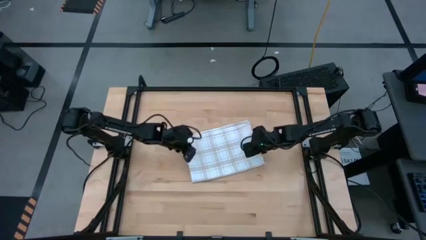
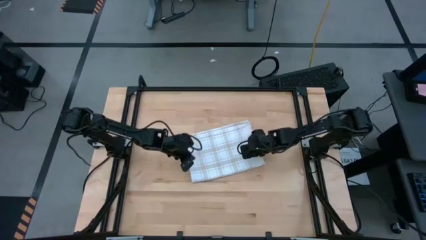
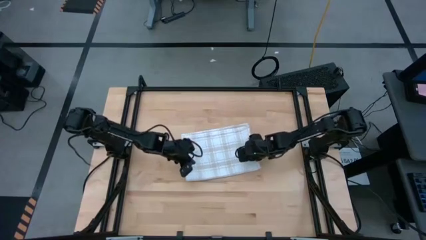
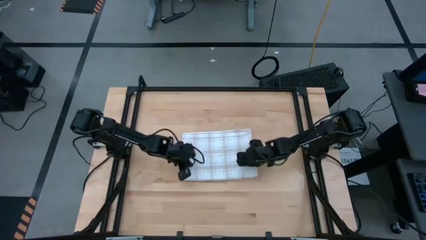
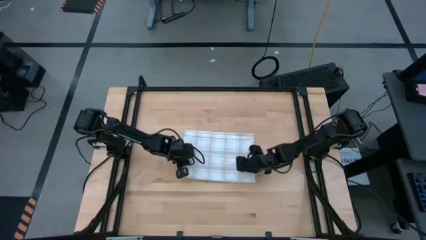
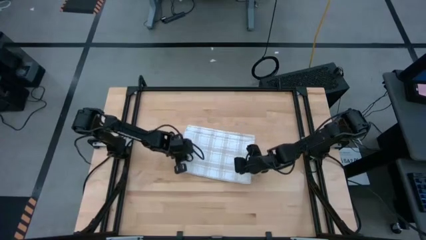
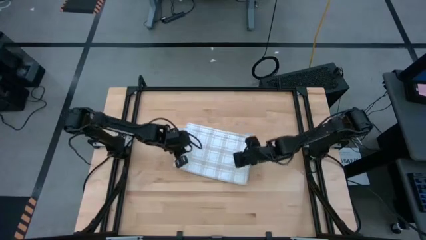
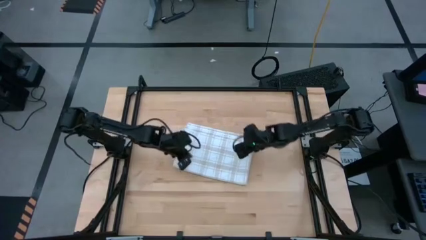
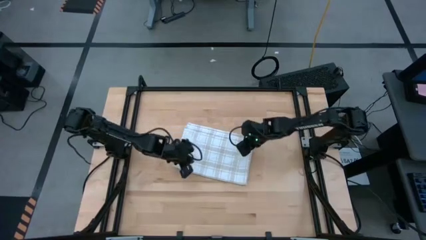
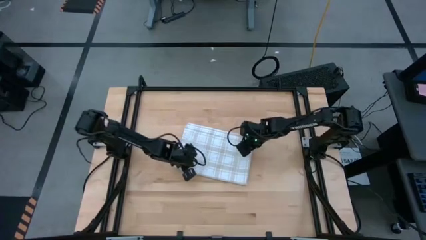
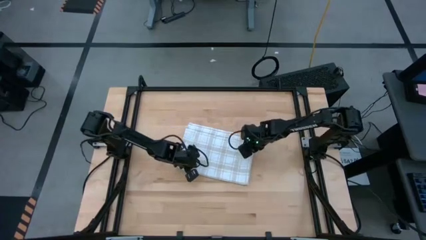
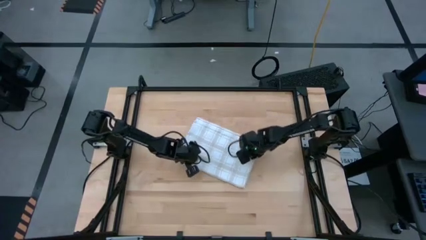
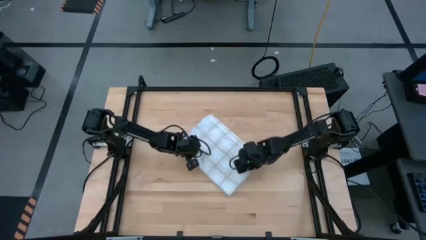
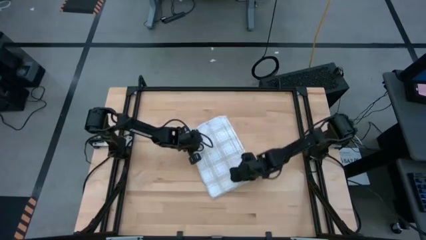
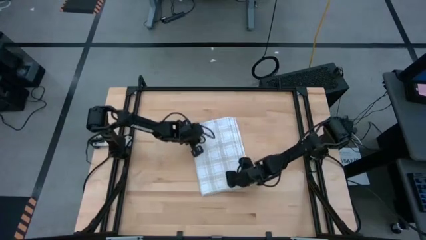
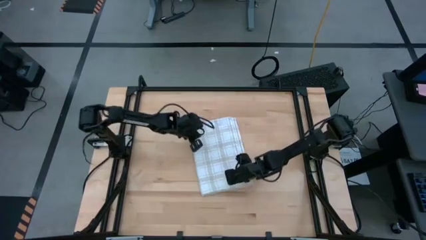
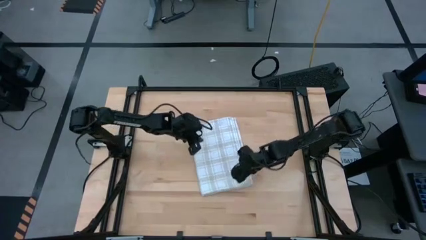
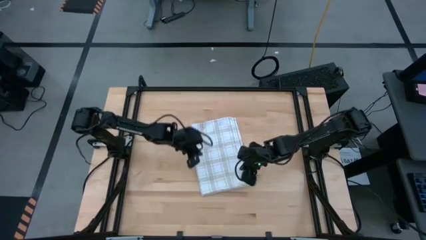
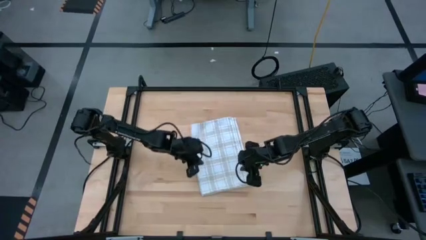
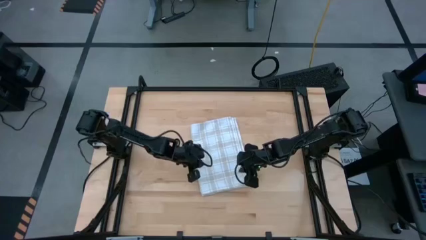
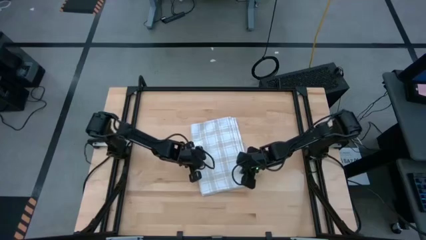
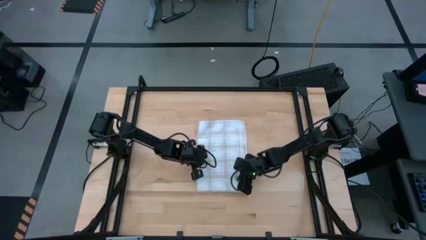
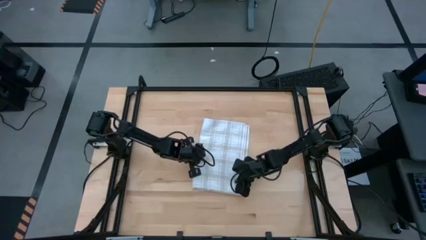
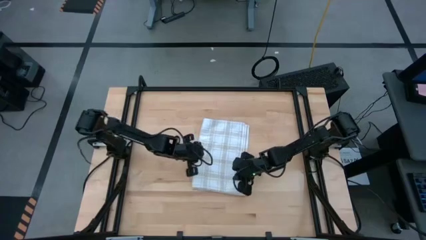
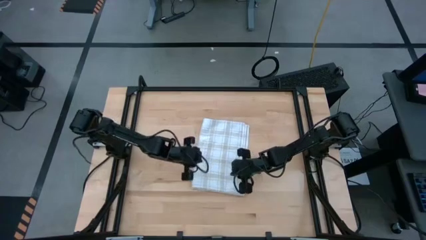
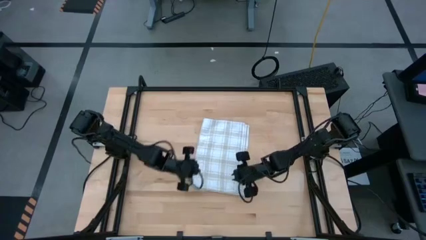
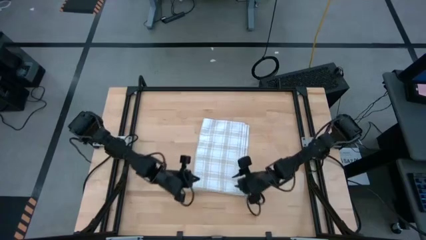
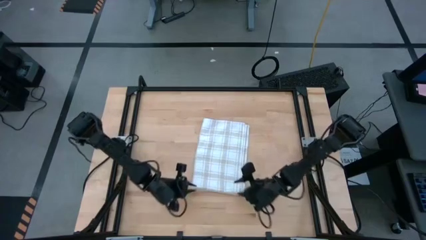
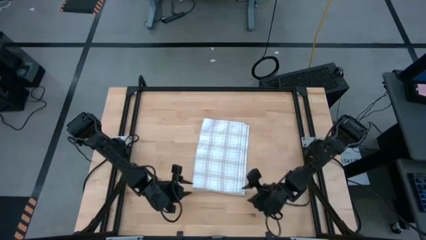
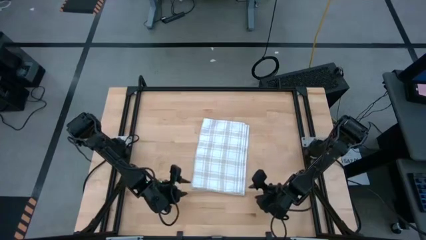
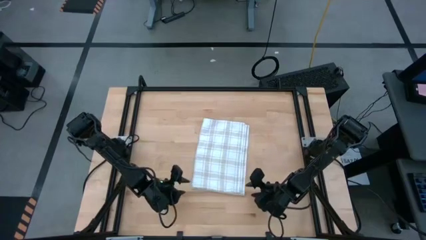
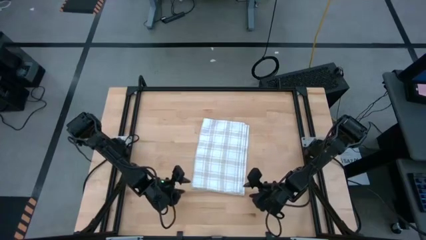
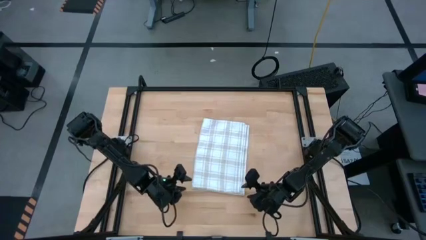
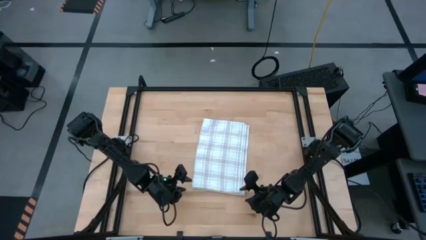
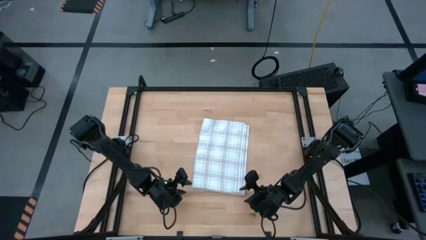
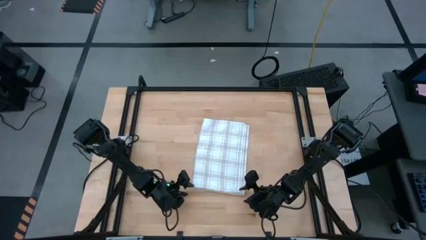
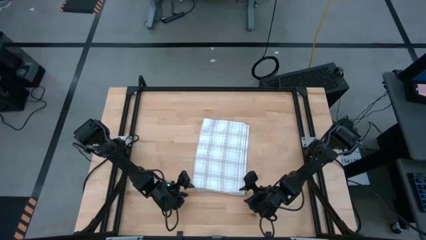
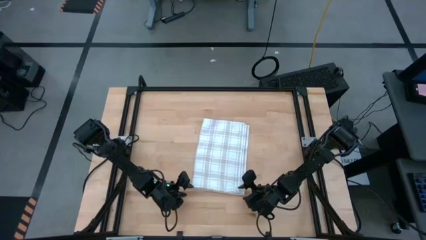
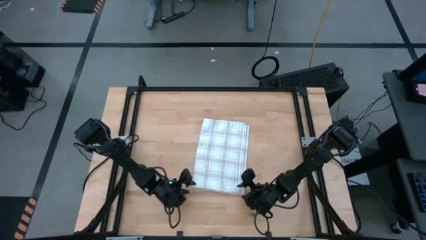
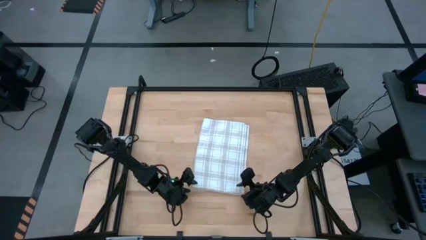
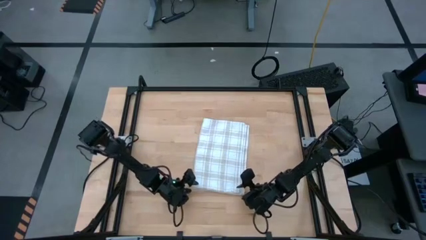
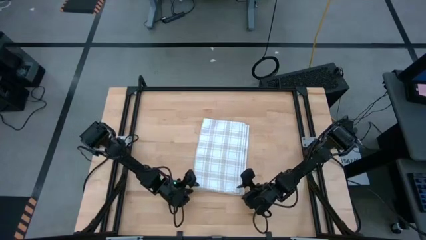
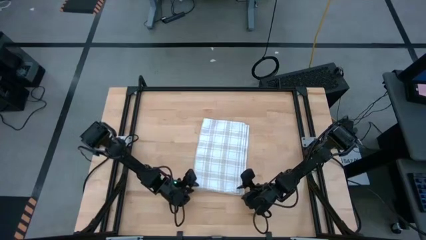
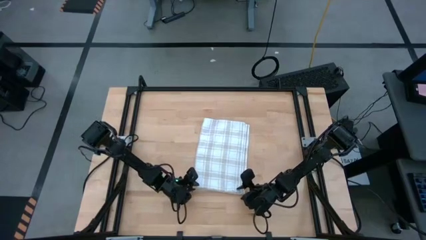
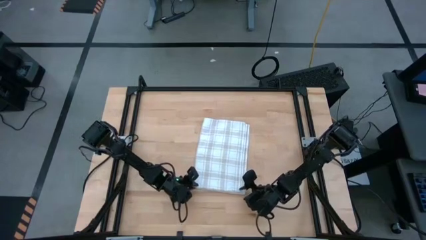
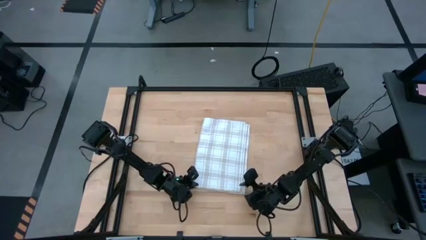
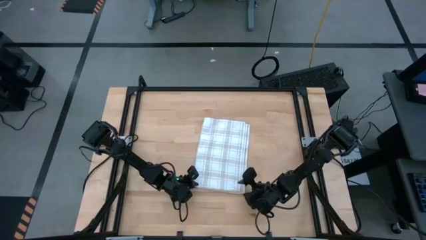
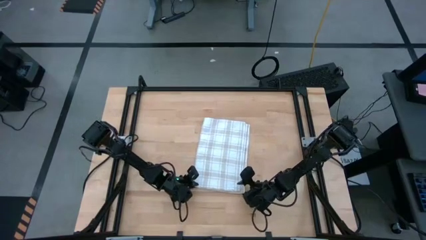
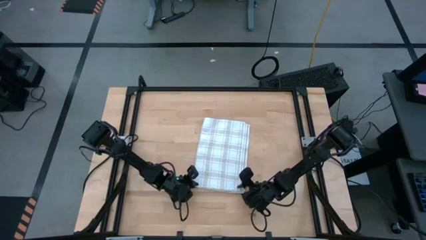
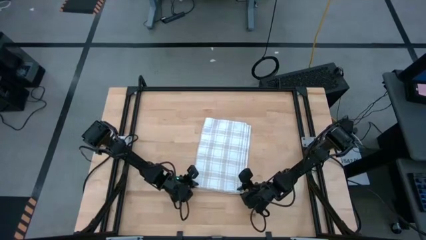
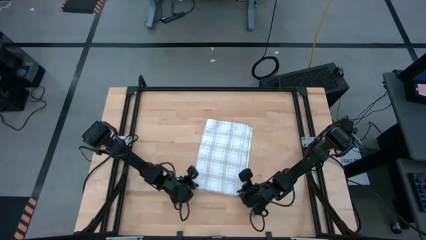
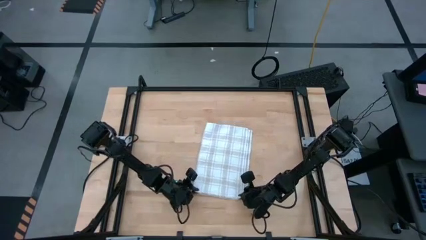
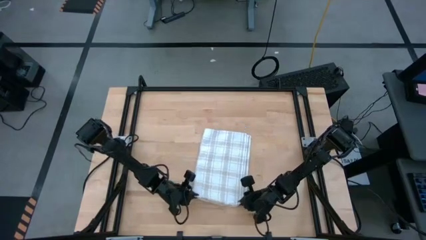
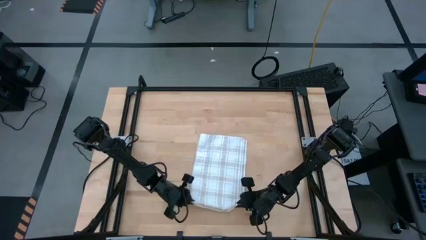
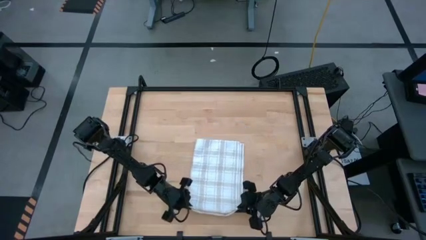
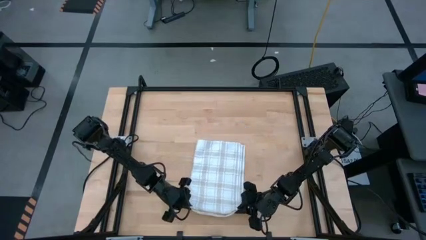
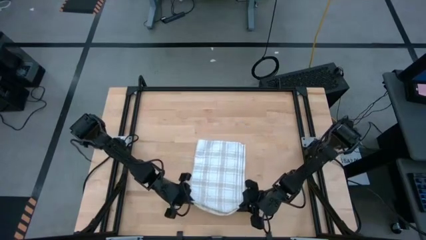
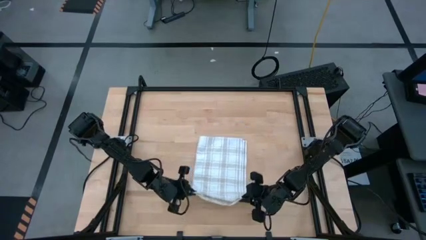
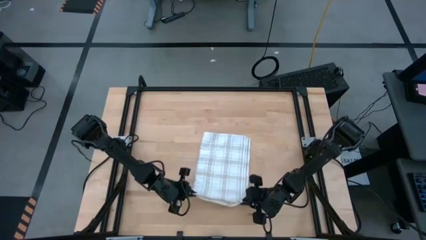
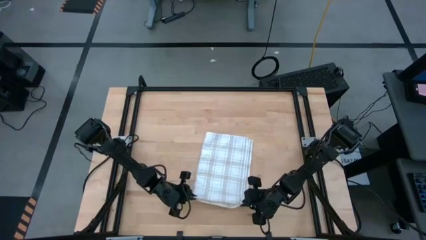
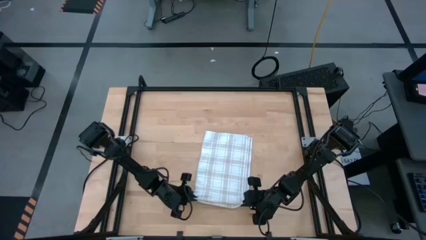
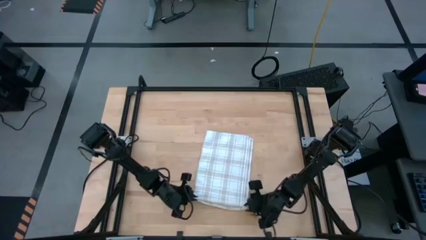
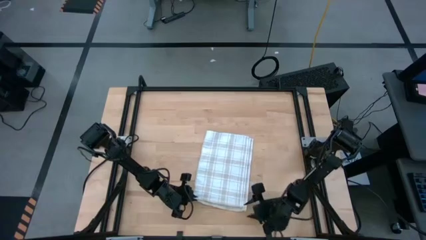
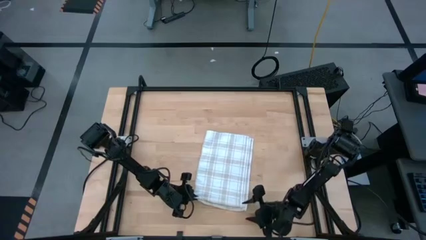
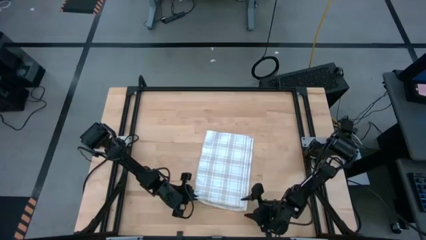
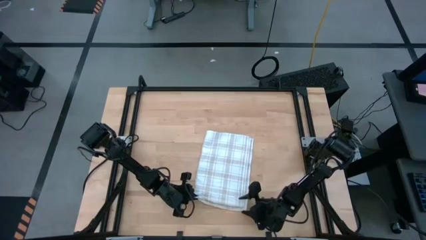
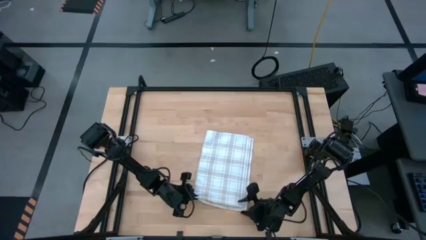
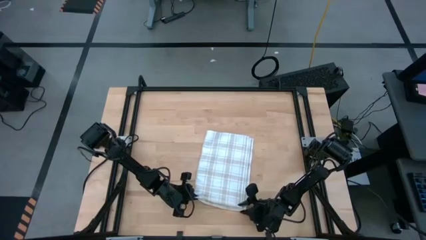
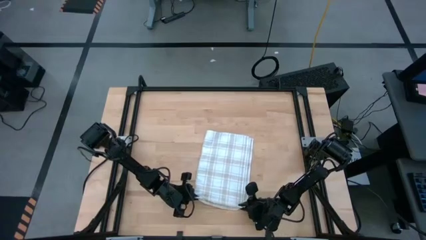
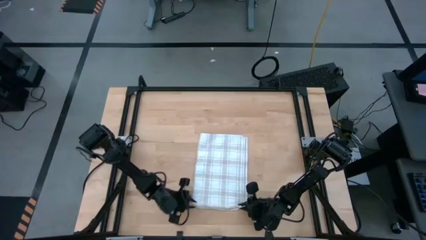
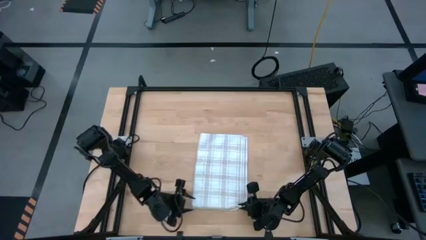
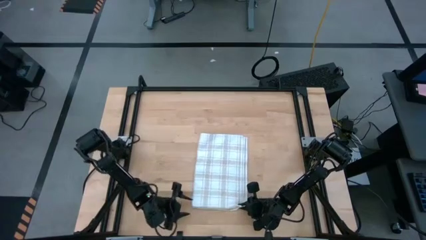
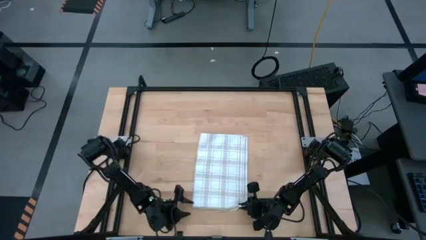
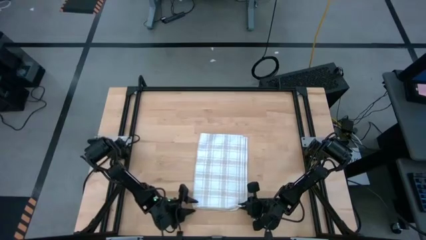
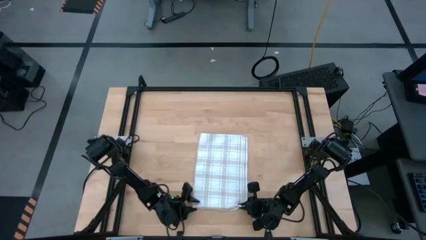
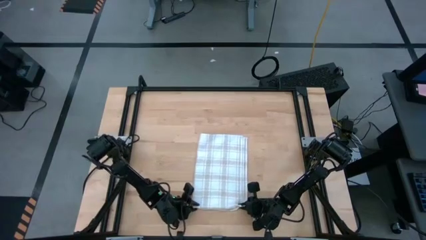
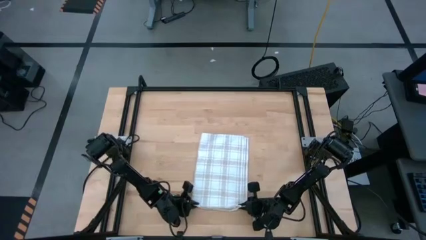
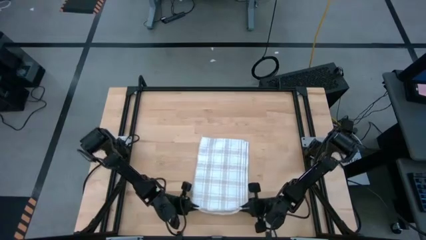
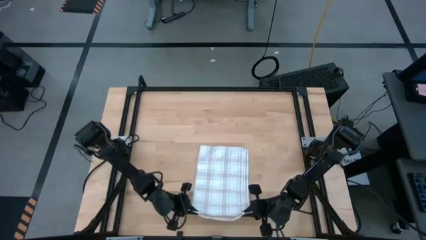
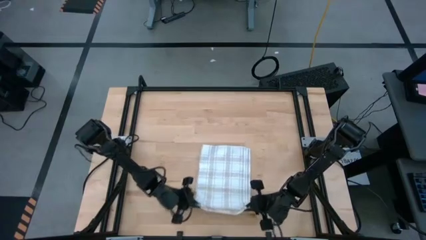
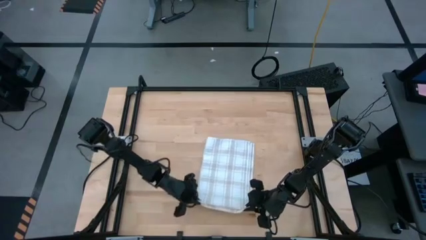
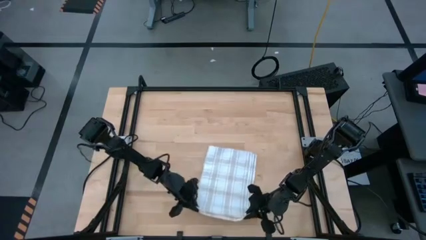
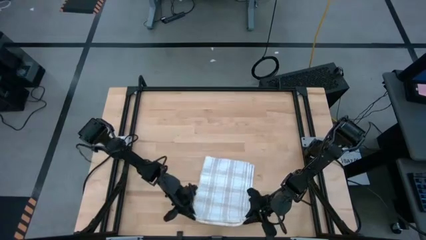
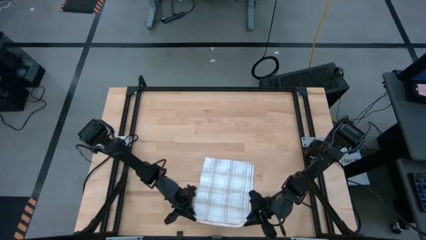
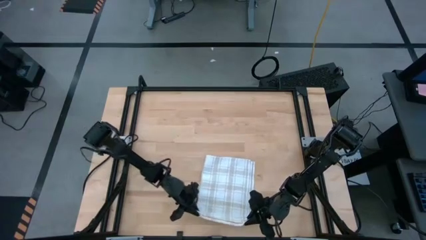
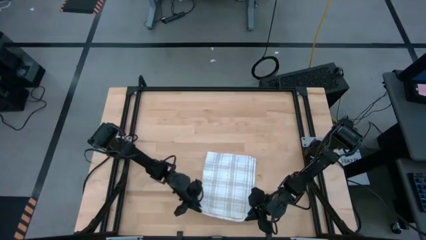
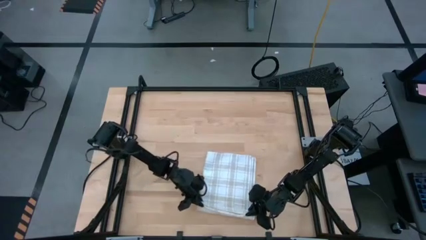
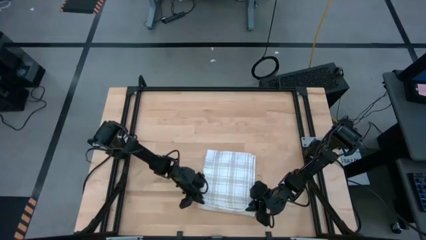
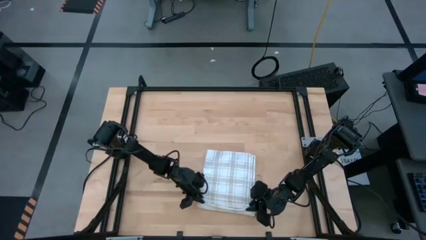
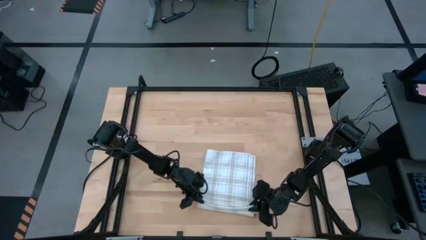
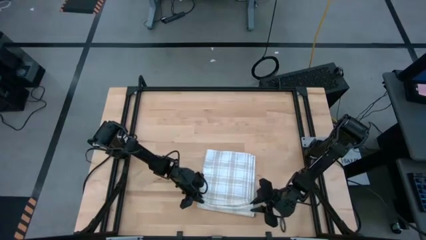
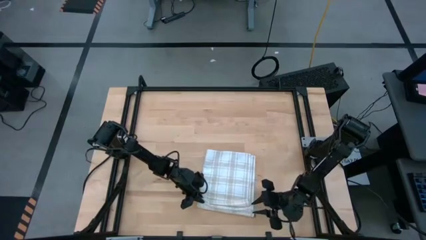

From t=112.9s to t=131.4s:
Task: Roll towel
Roll the white towel
